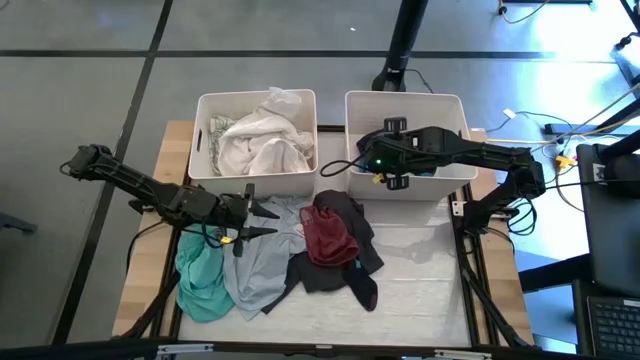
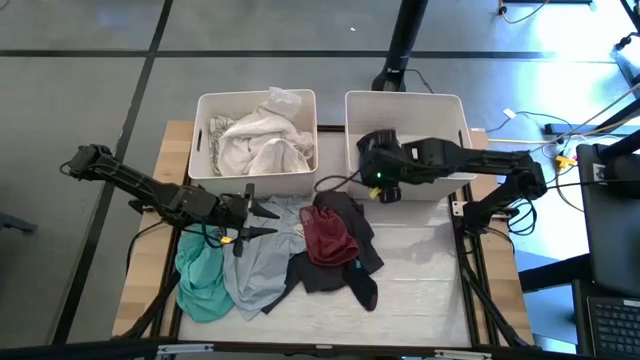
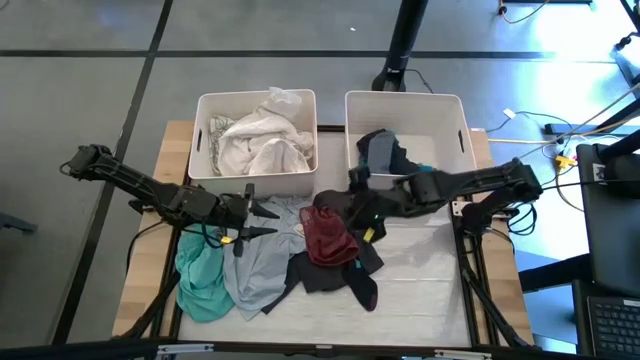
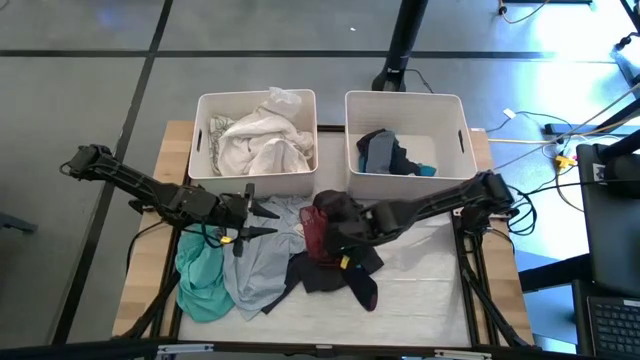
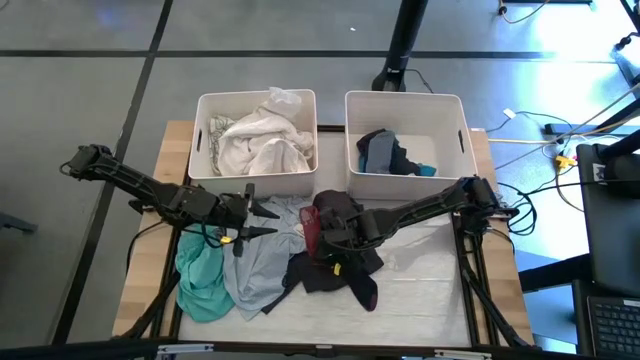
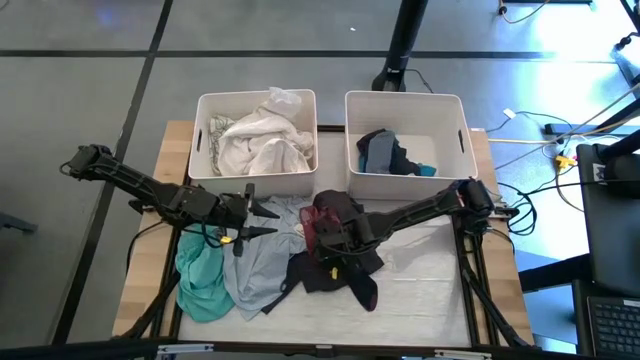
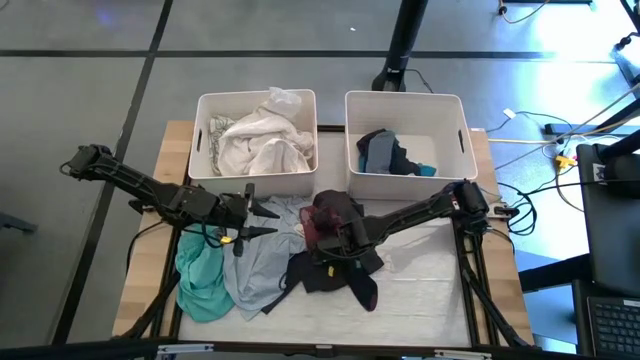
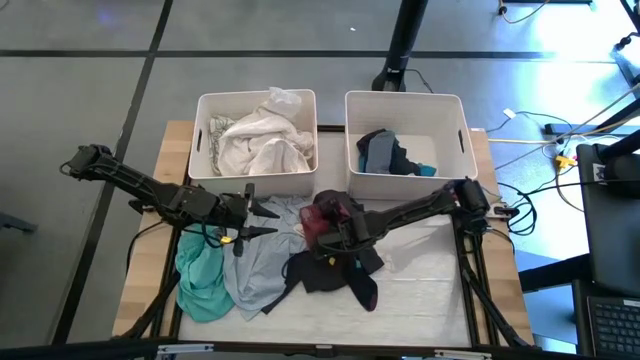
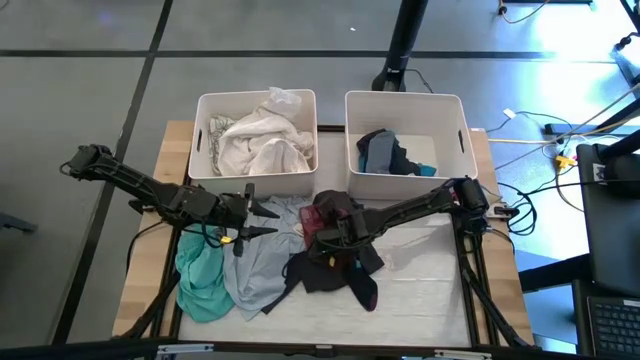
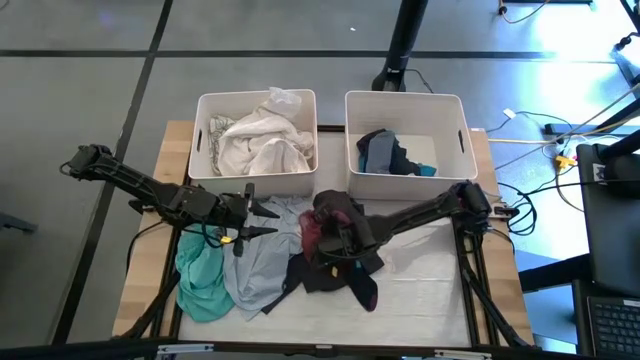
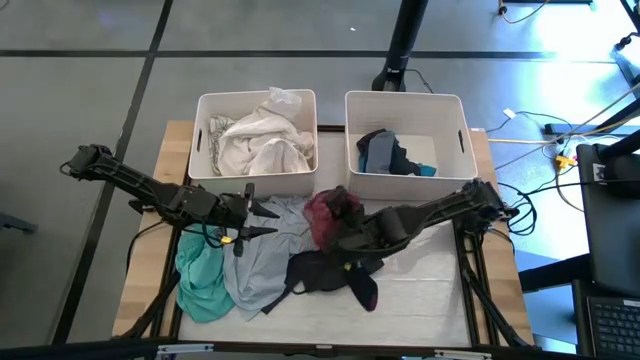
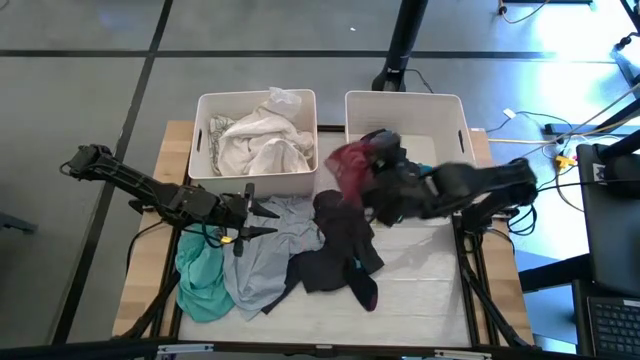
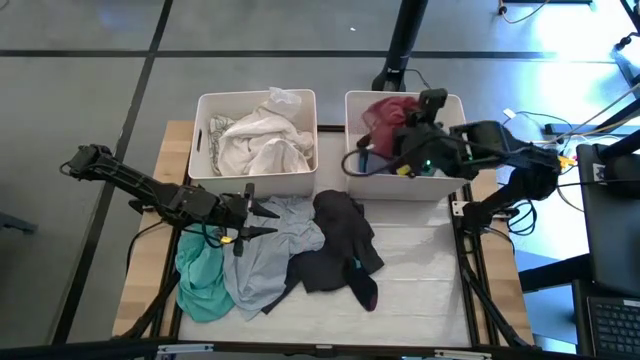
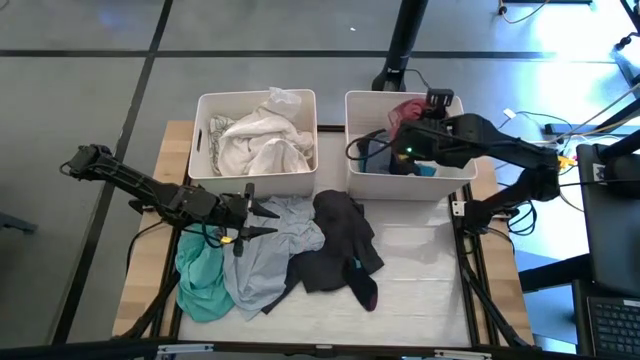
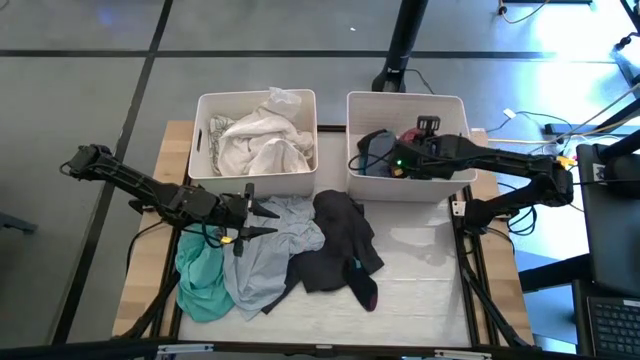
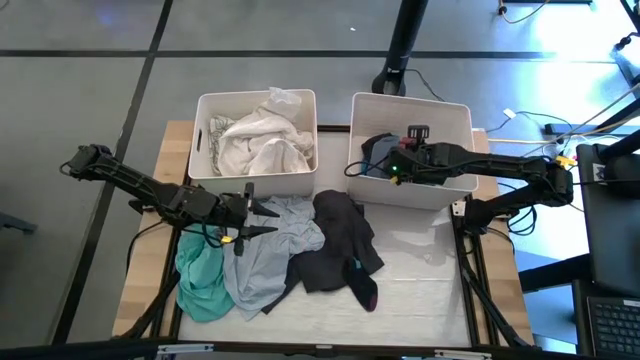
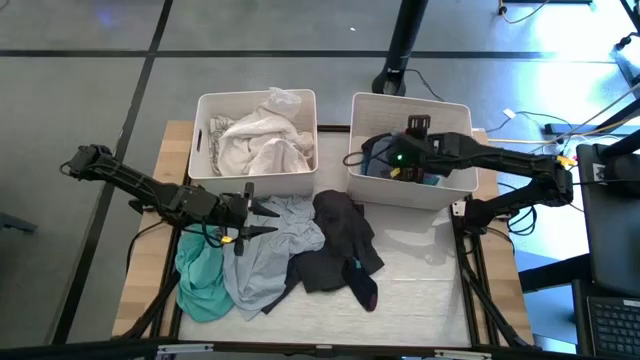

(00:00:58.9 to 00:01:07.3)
Task: Sort clothes
Put the red underwear into the right white bin

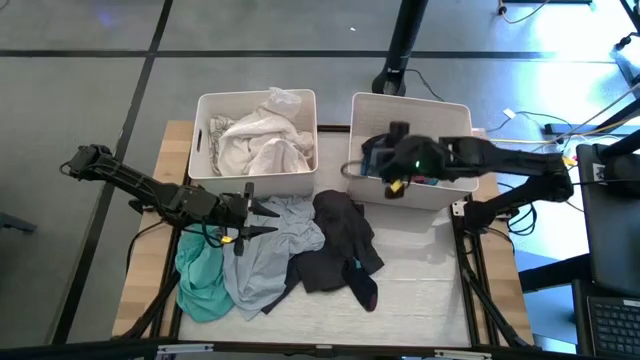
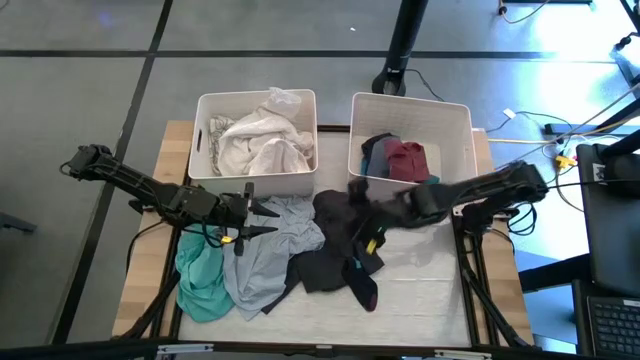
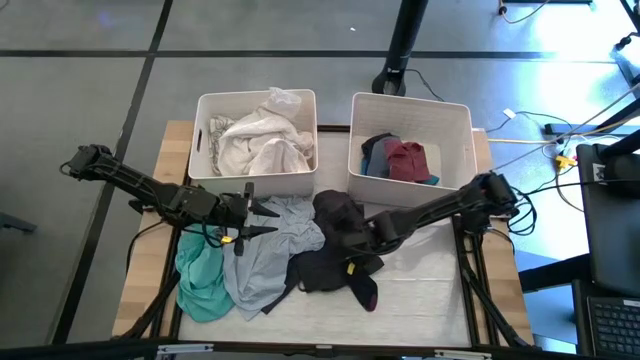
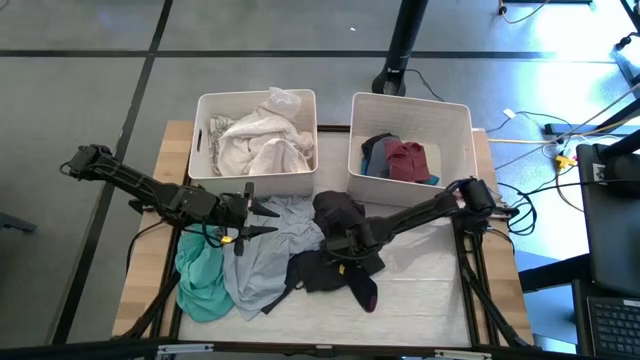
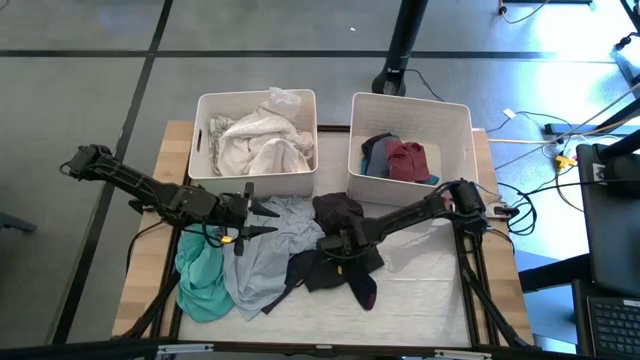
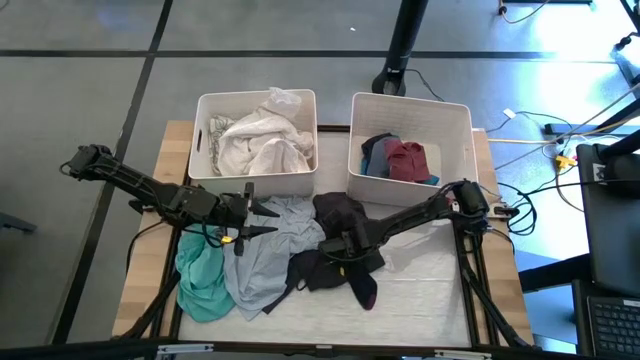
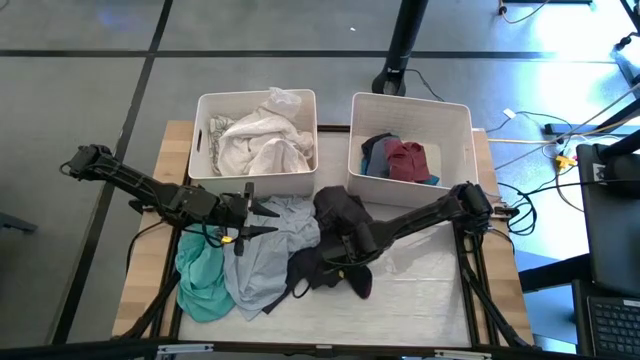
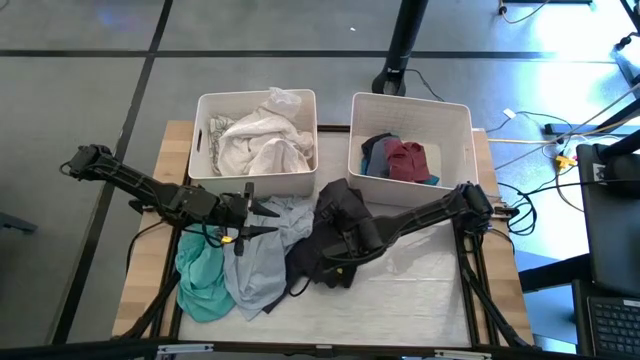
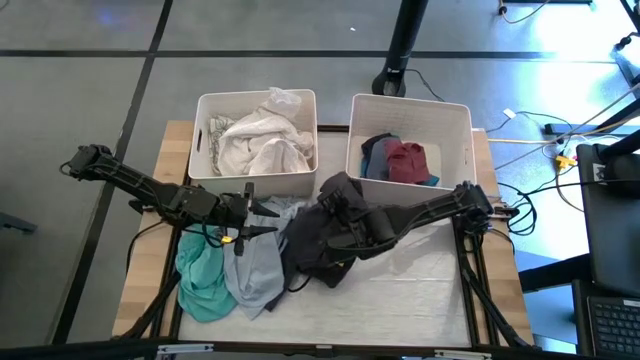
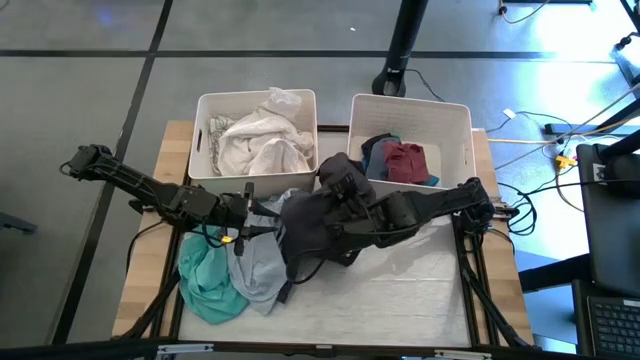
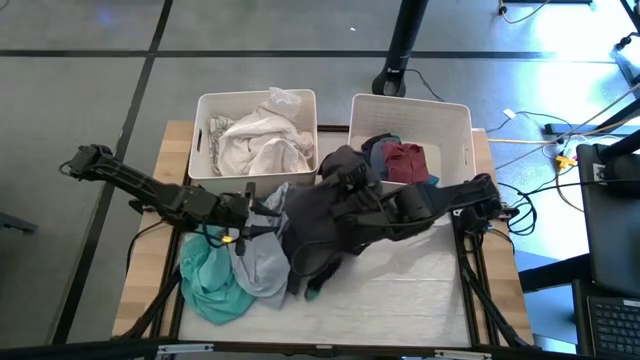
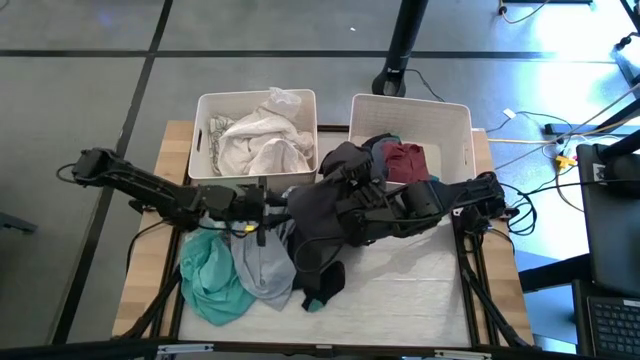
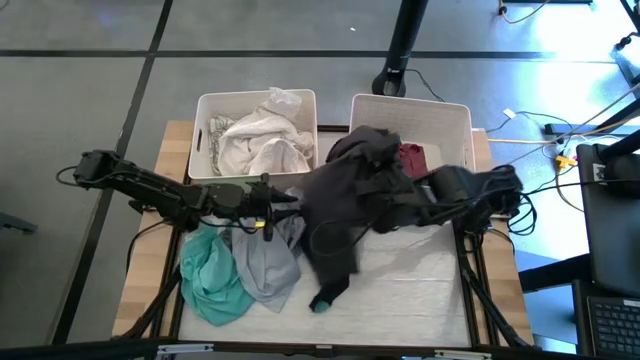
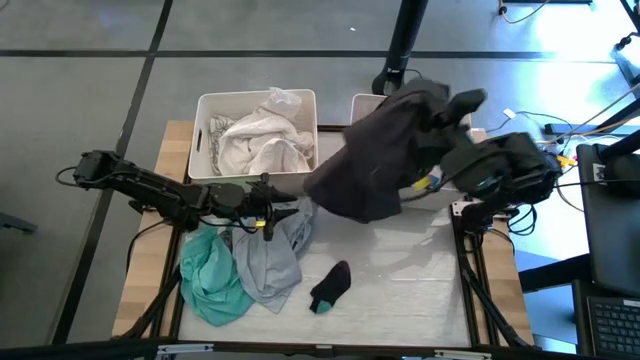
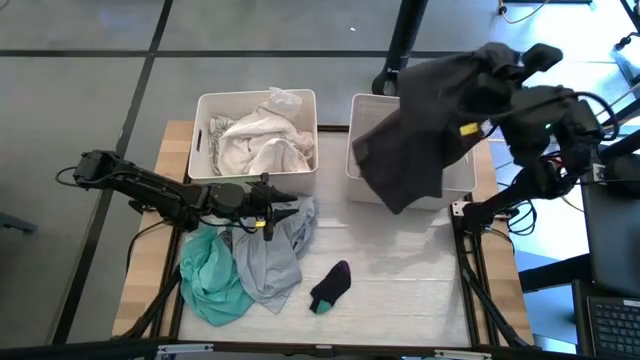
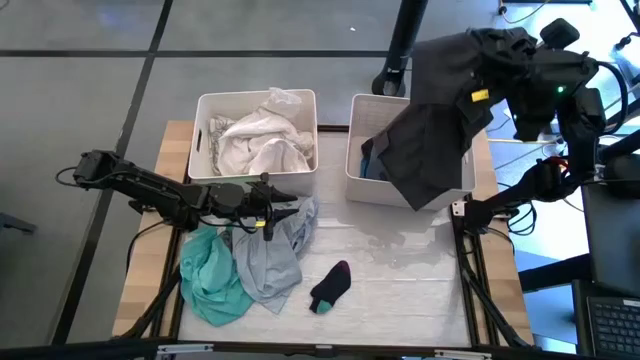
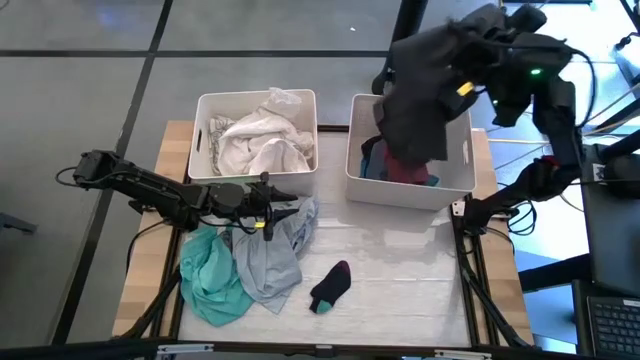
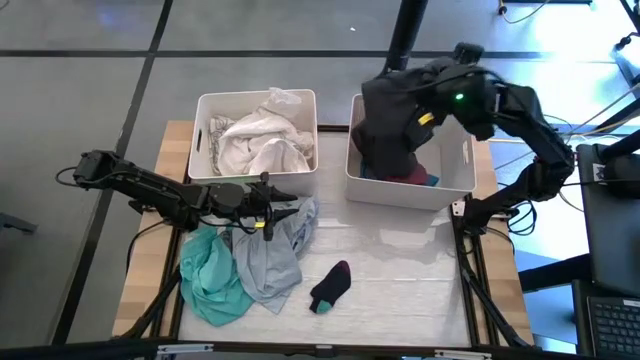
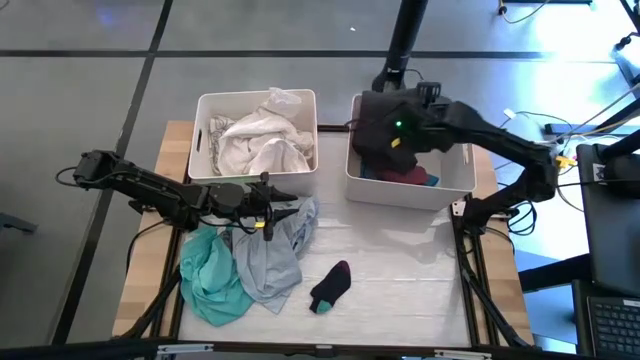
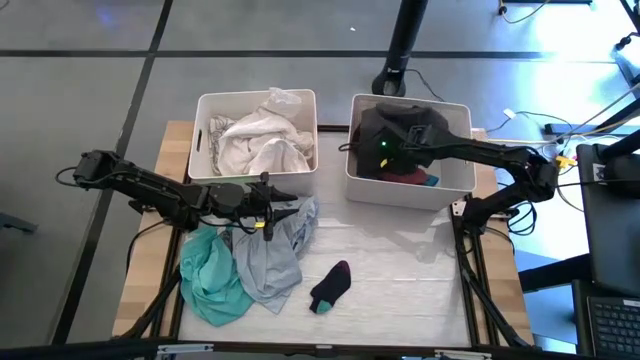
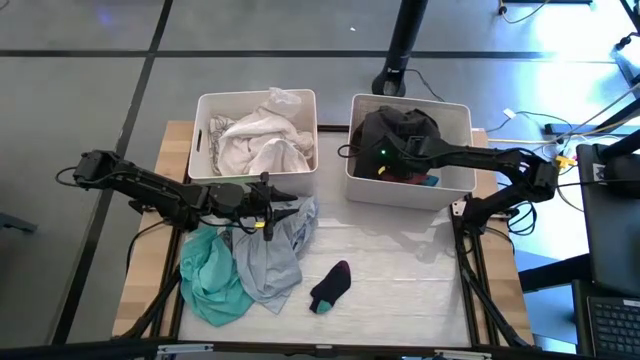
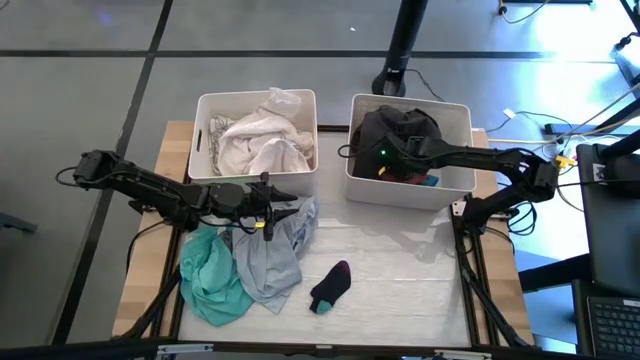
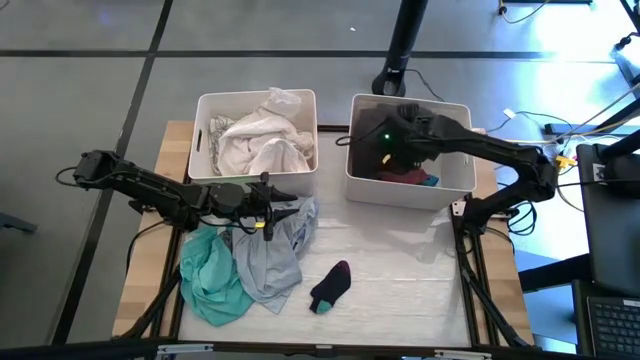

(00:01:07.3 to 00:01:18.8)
Put the black shorts into the right white bin

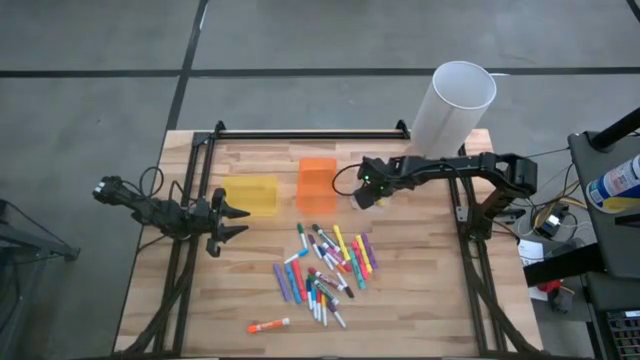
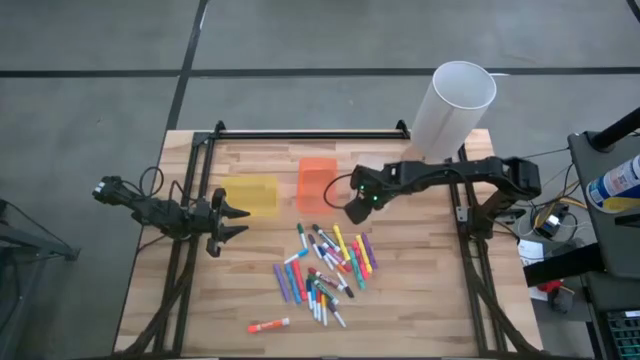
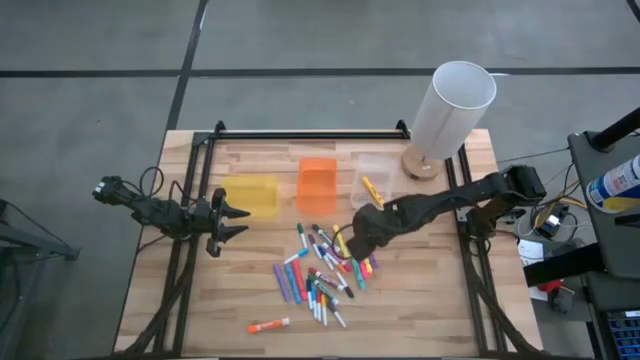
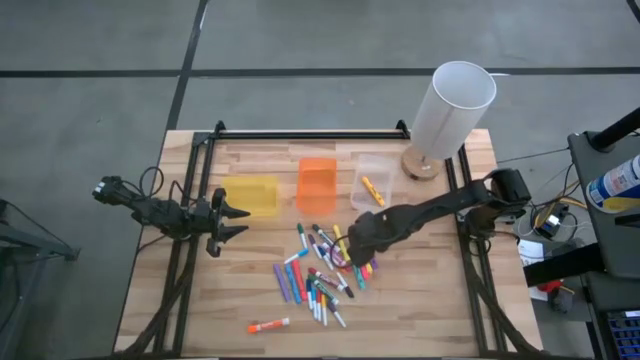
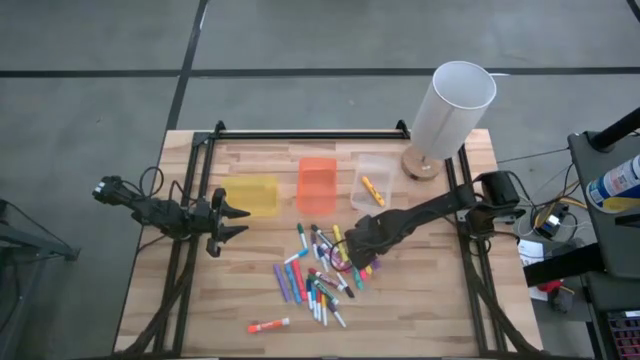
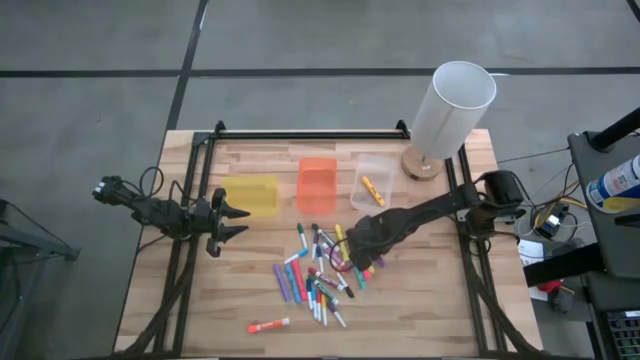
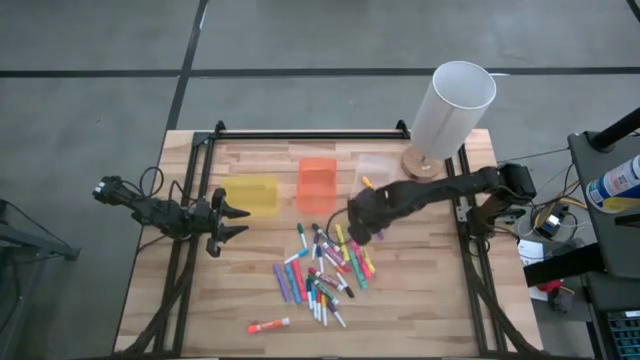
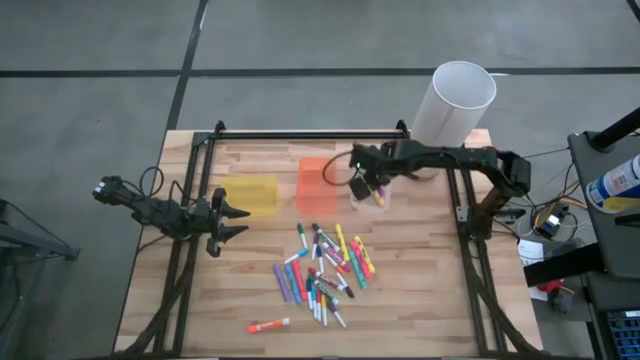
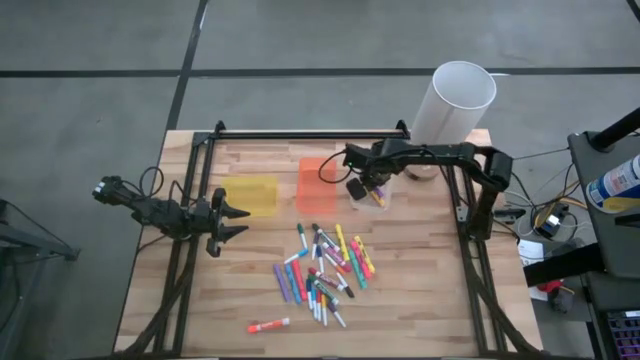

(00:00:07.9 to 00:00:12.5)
Task: Pick & Place Markers
Put the purple highlighter into the transparent bin
